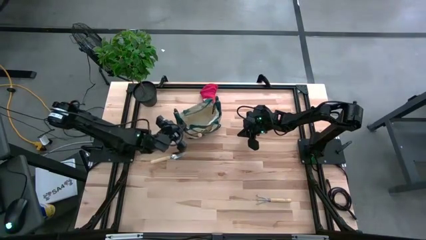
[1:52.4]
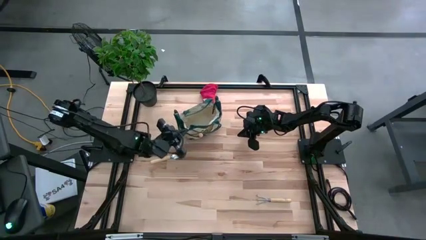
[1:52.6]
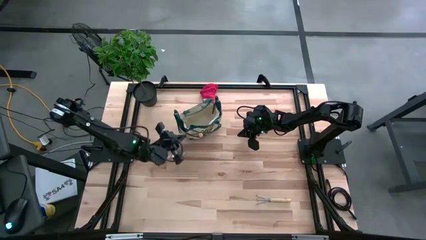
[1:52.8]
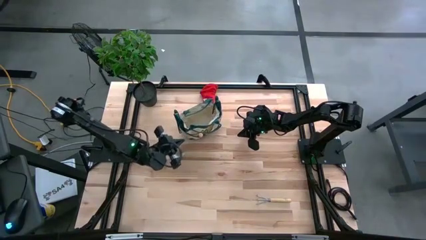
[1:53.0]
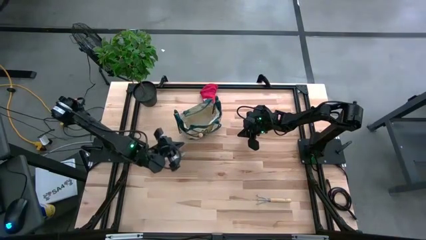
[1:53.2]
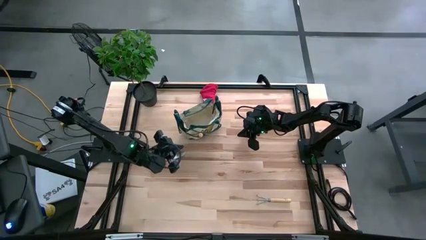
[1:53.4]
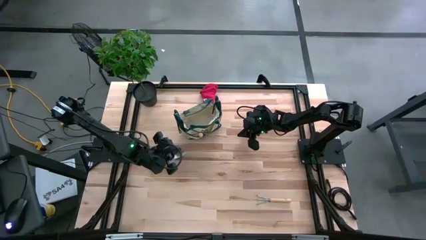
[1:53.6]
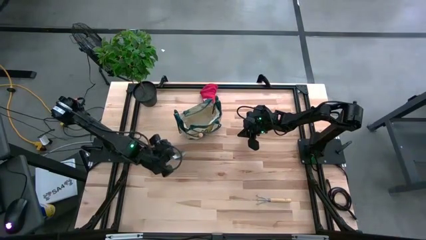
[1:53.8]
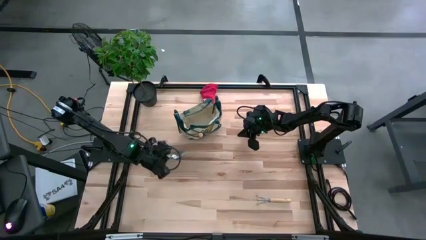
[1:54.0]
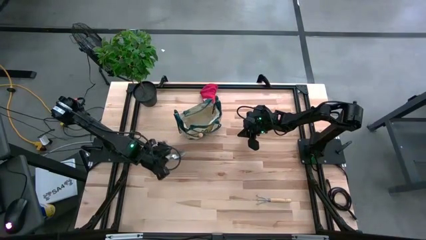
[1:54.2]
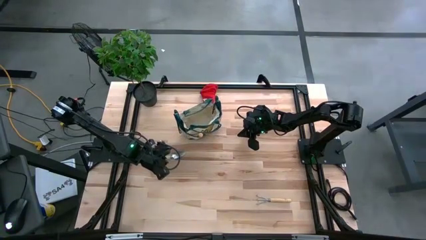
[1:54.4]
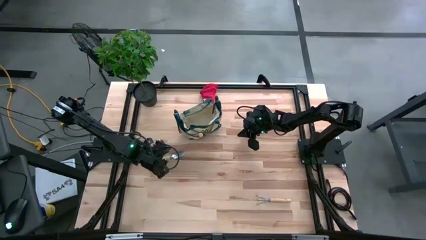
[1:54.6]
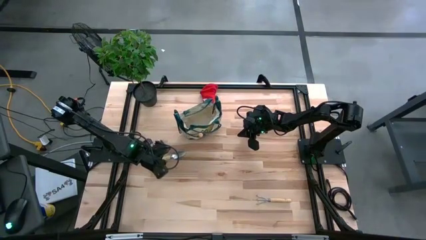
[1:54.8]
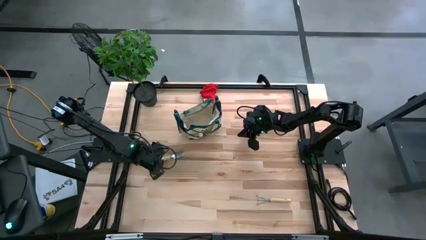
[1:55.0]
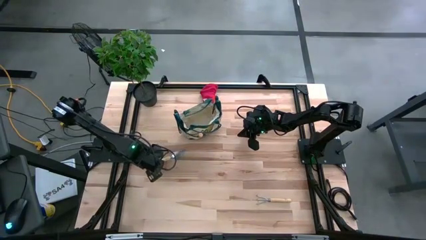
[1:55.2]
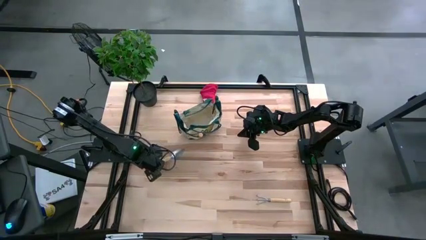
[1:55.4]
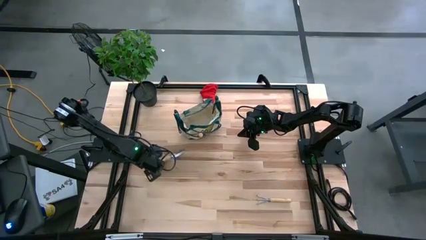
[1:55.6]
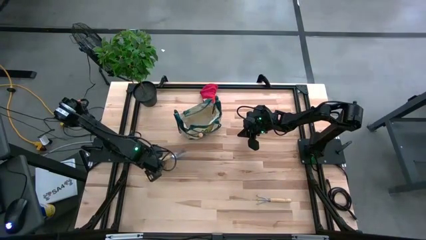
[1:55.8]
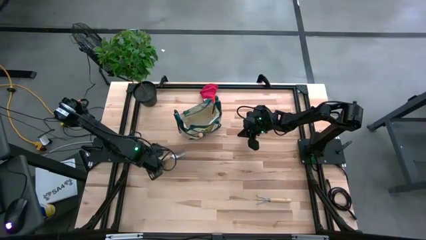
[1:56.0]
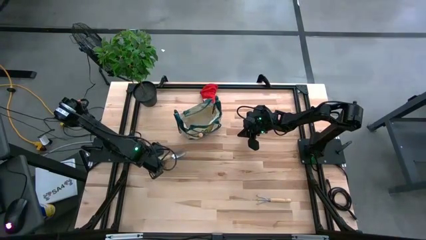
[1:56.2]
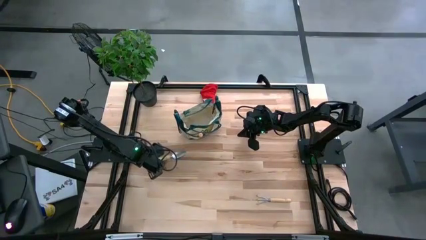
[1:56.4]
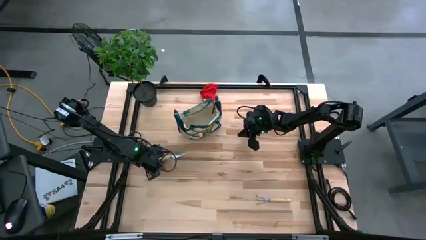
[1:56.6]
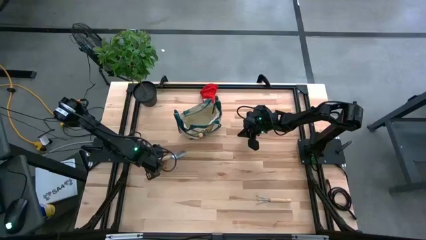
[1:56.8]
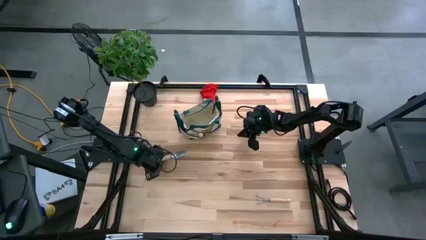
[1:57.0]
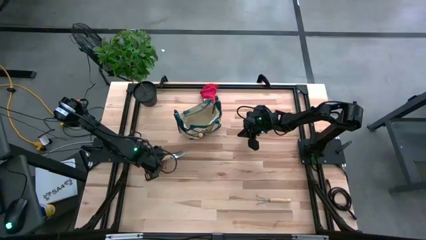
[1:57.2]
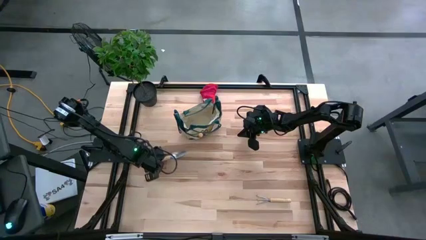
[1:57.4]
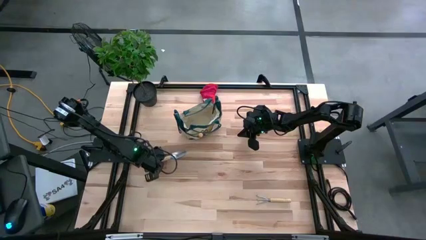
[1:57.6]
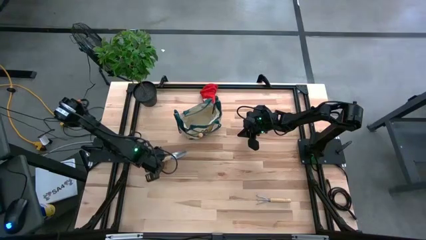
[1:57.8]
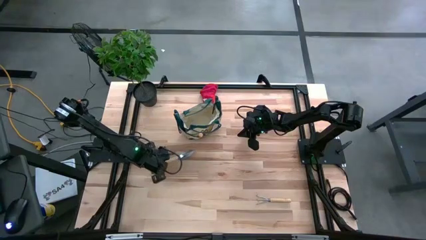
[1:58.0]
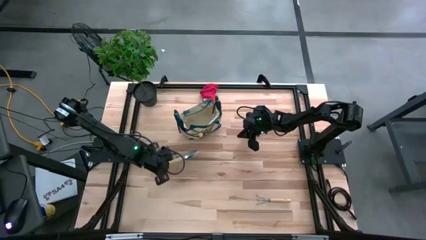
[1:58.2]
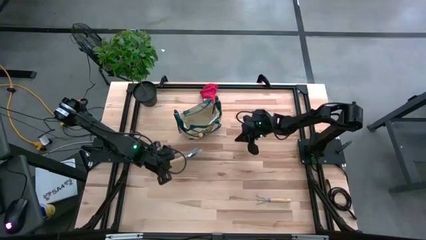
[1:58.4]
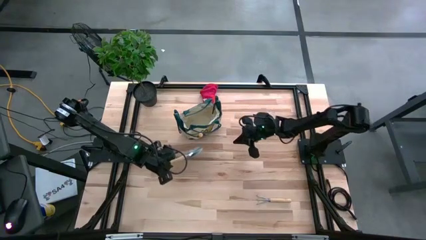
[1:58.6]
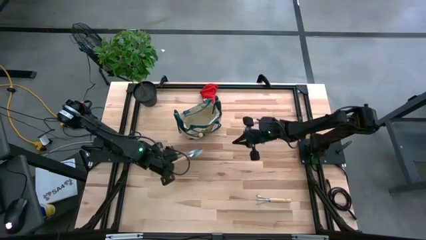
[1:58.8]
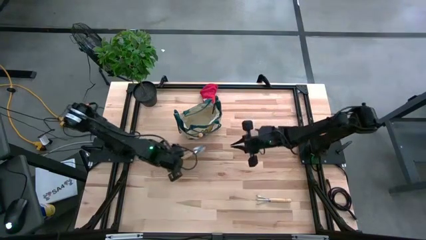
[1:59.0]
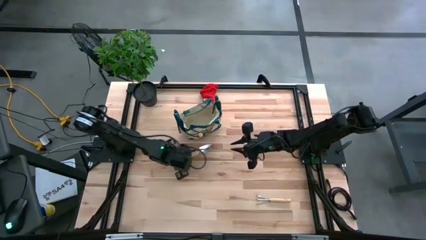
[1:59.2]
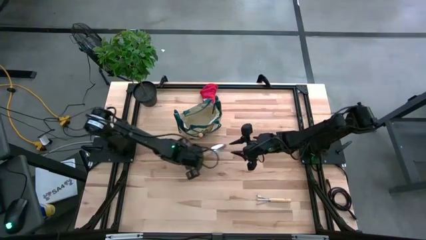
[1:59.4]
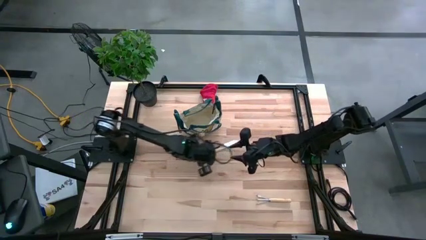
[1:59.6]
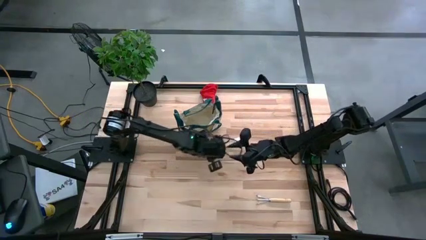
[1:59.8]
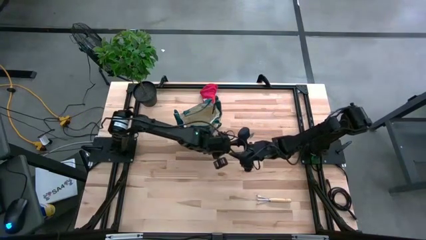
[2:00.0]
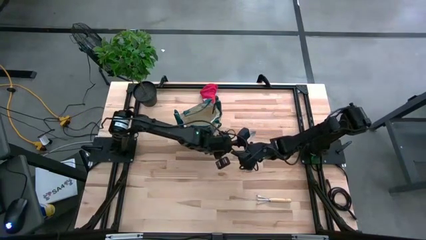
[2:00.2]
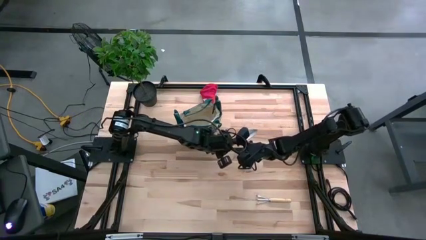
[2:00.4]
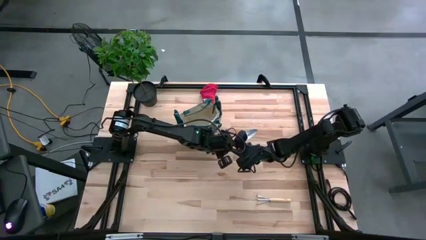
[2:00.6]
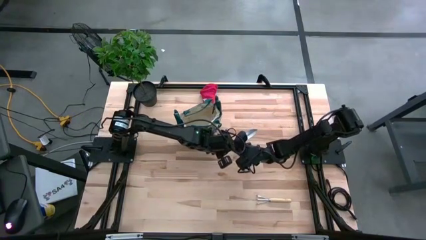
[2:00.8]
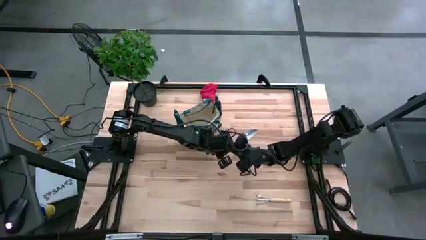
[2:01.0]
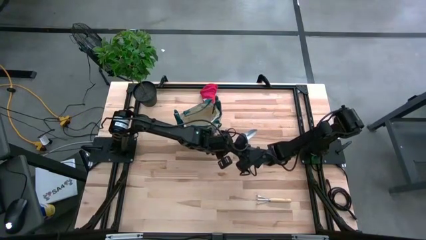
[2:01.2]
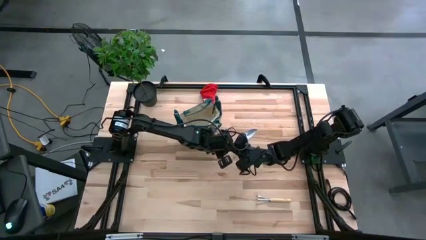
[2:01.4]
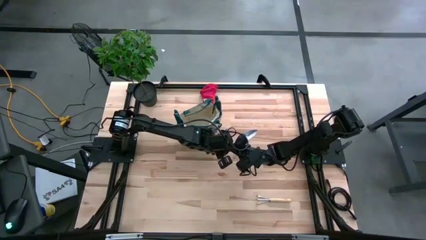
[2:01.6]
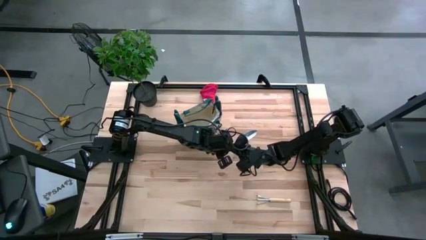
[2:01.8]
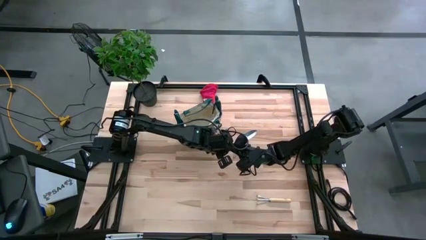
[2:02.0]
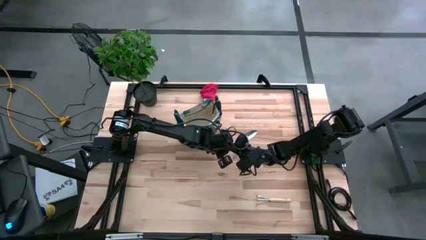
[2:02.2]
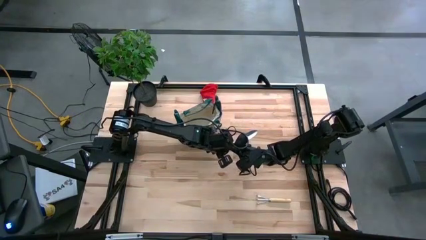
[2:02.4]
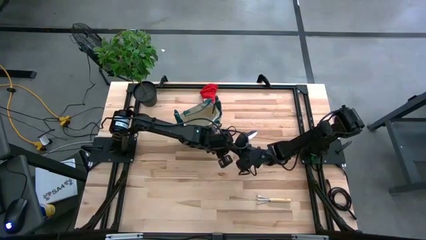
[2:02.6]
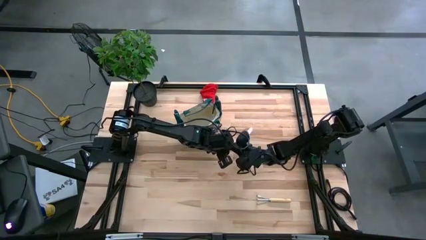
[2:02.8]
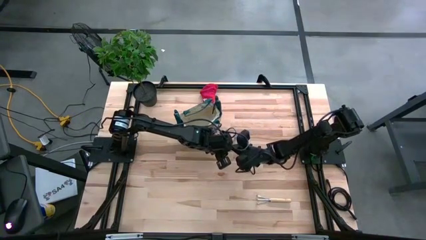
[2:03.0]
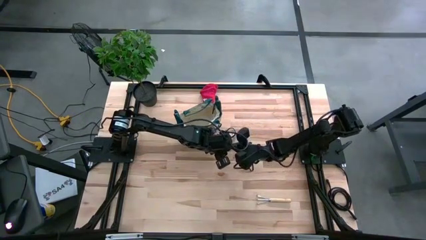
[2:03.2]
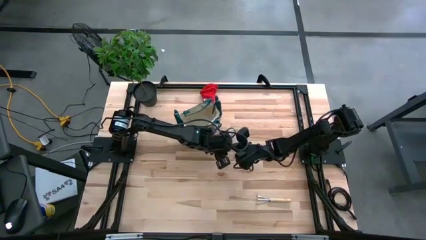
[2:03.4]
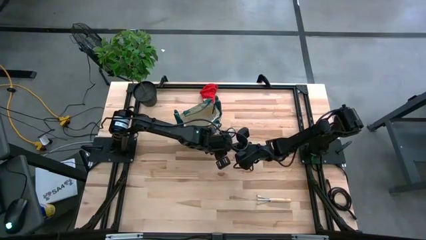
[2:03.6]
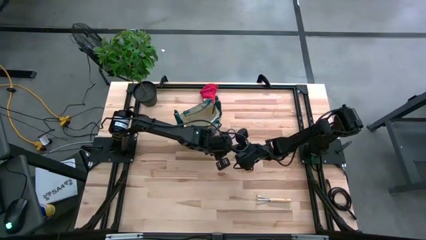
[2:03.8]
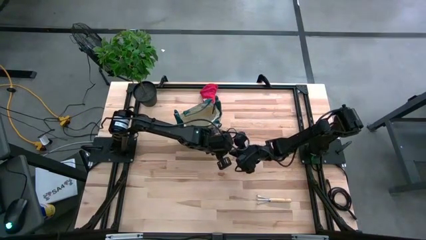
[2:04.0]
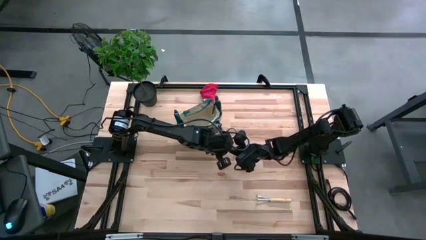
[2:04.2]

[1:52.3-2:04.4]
Task: Pick & Place Garden tools in Gardening bag
Put the trowel into the gardening bag

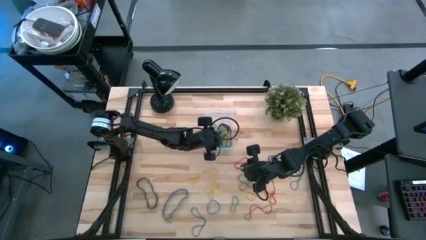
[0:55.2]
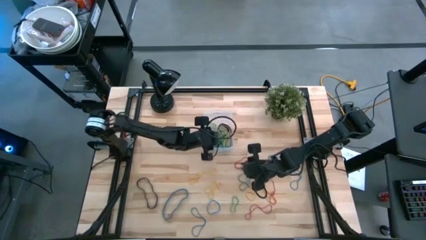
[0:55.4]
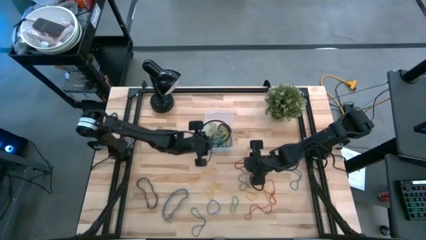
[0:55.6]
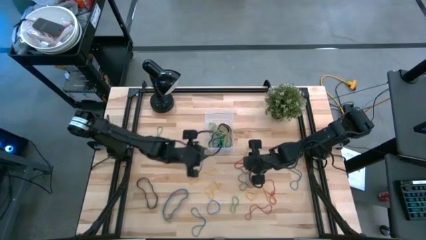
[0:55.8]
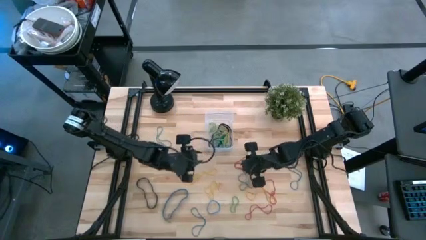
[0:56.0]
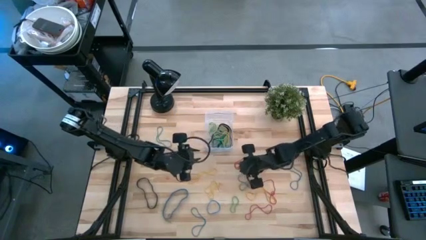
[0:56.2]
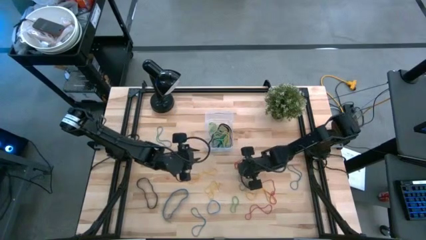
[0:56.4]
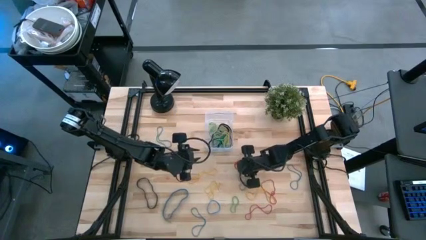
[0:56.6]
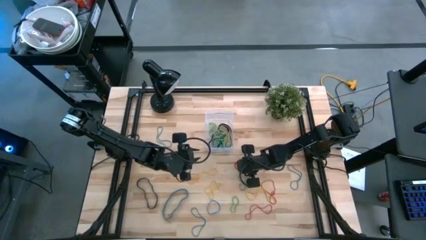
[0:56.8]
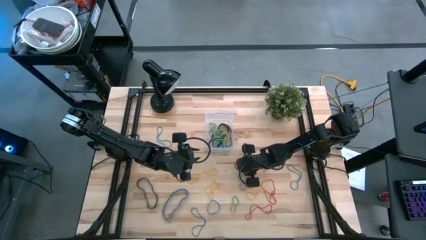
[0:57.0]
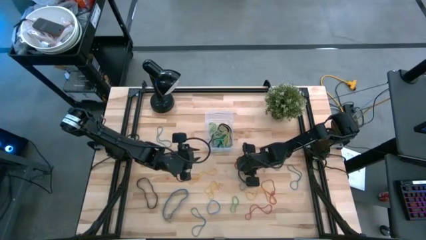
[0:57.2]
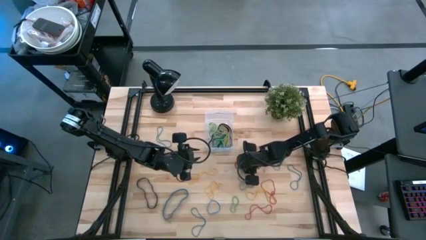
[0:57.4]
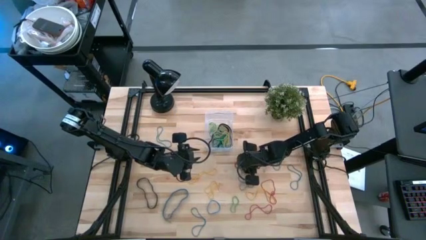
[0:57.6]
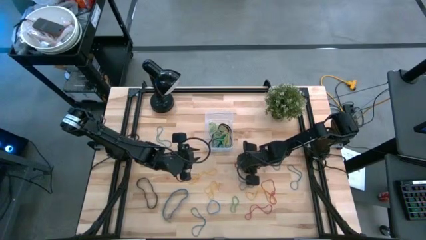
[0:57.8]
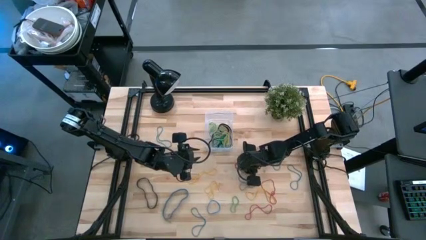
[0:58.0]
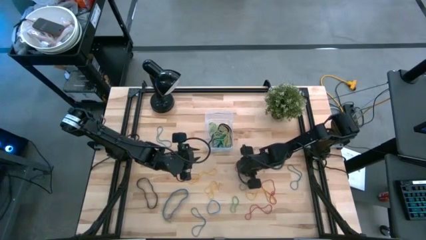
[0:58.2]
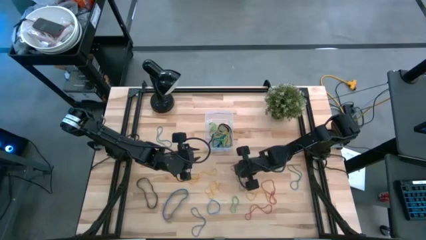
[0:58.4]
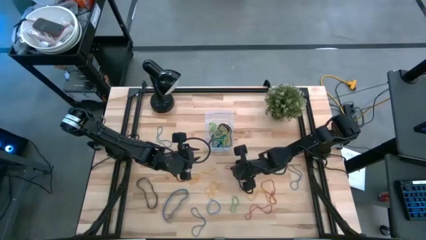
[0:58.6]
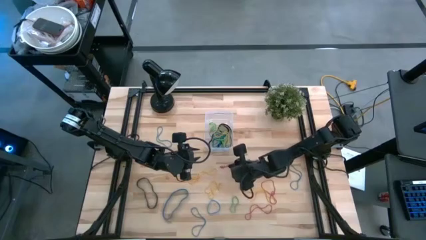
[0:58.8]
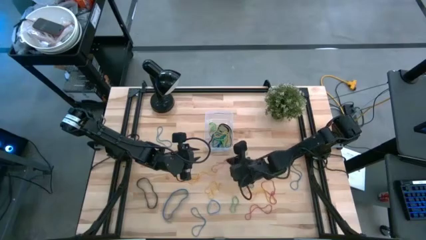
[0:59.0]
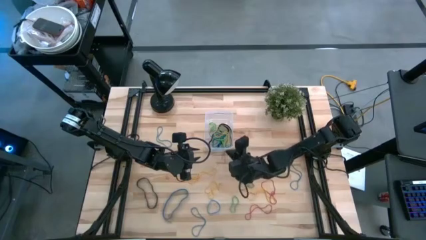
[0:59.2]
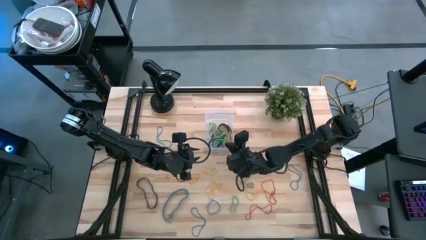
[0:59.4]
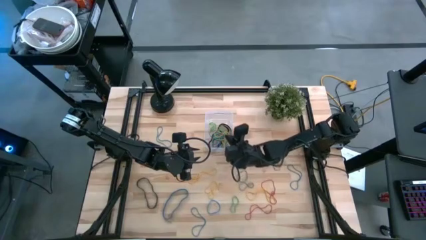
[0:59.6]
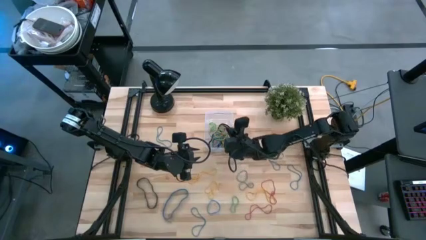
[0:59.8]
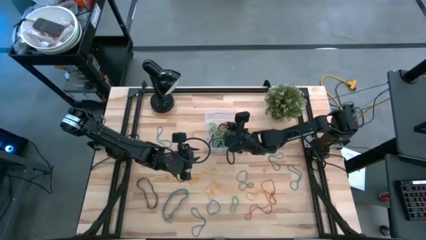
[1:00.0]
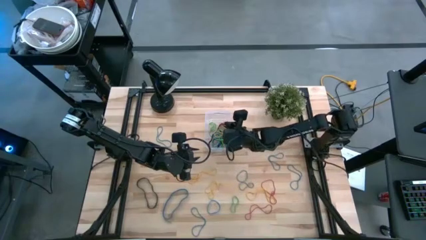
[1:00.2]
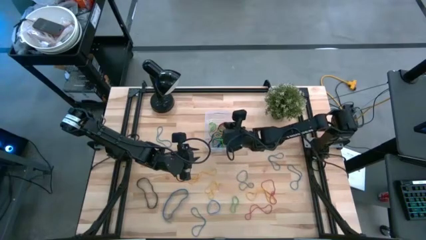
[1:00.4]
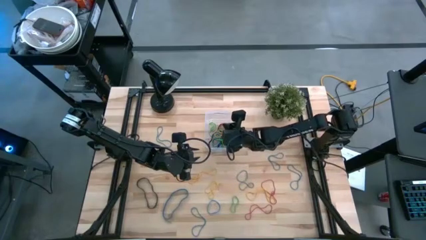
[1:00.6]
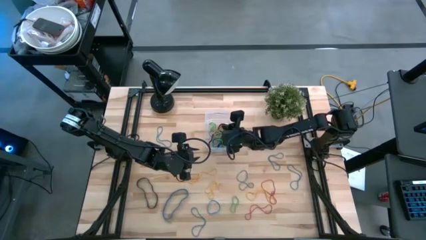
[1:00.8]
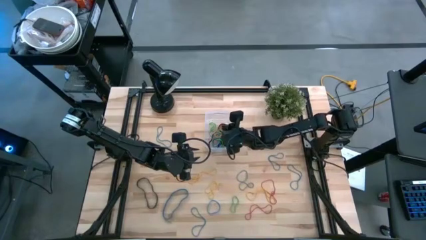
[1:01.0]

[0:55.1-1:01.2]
Task: Pick and place rubber bands into bin
Put red rubberband into the transparent bin
